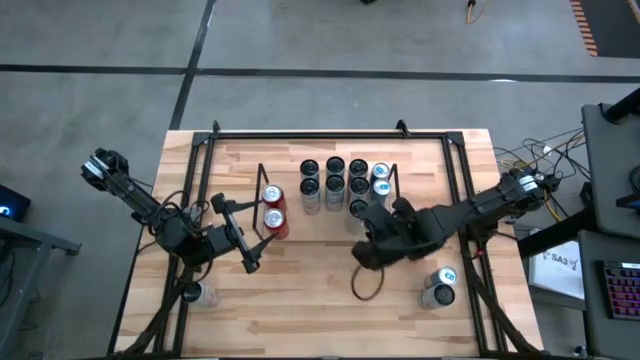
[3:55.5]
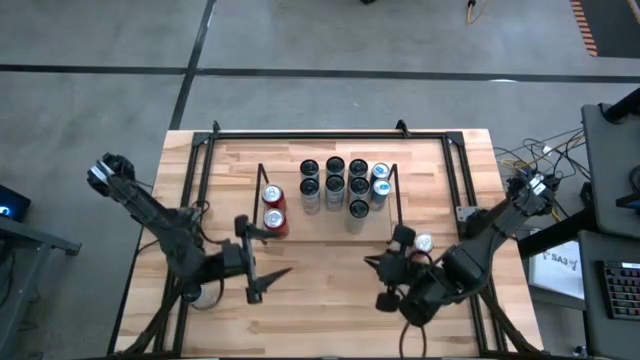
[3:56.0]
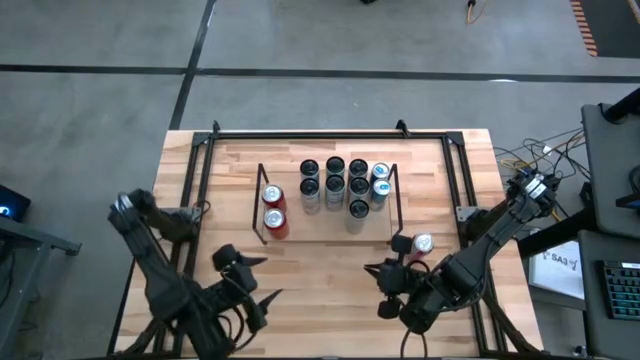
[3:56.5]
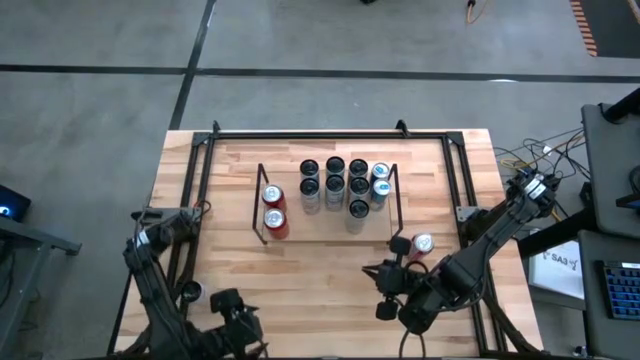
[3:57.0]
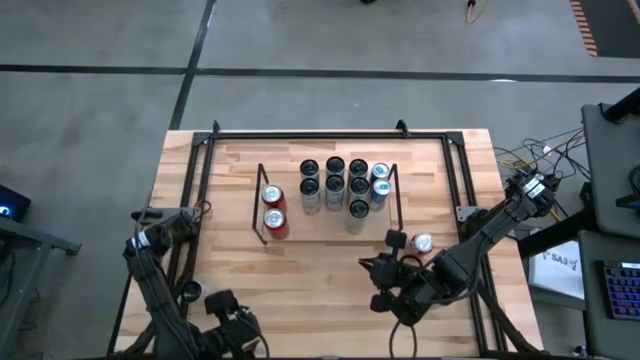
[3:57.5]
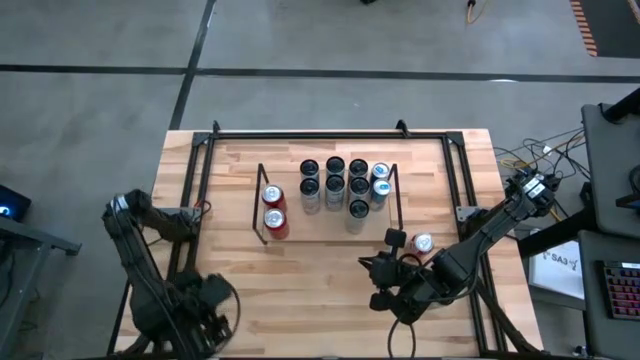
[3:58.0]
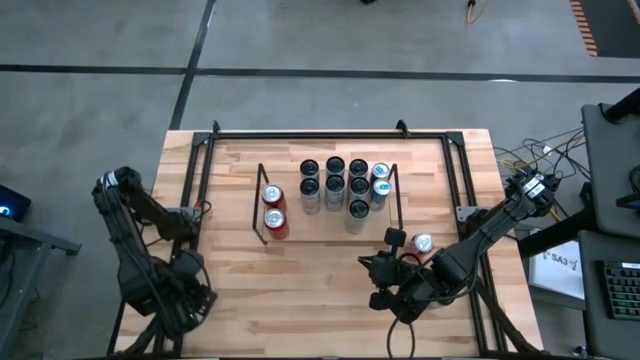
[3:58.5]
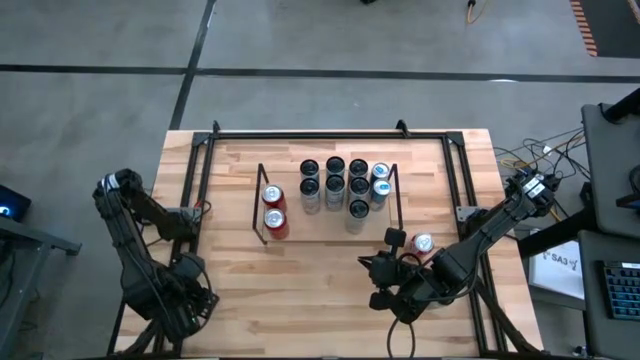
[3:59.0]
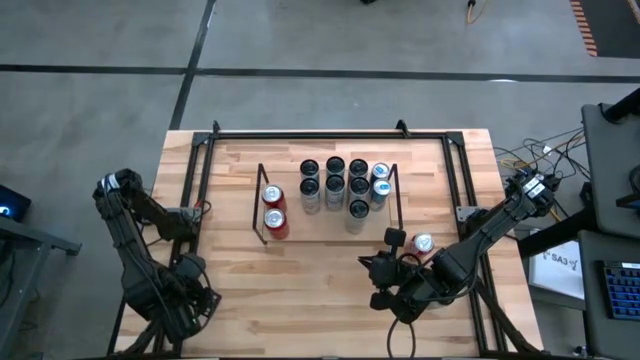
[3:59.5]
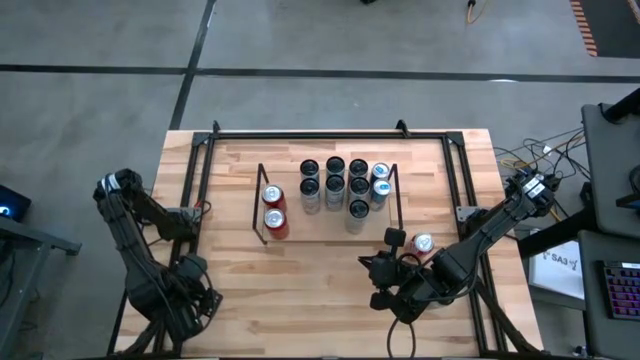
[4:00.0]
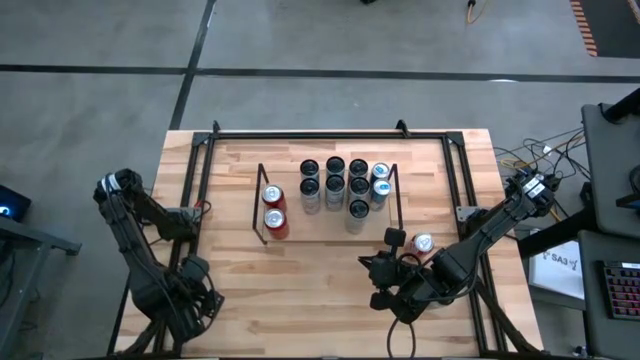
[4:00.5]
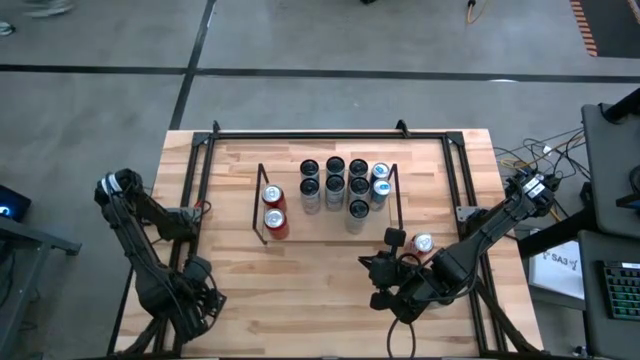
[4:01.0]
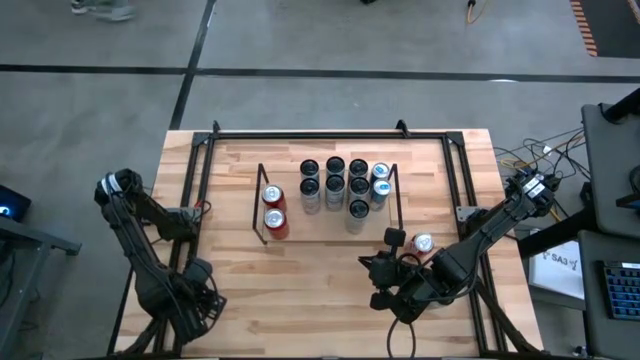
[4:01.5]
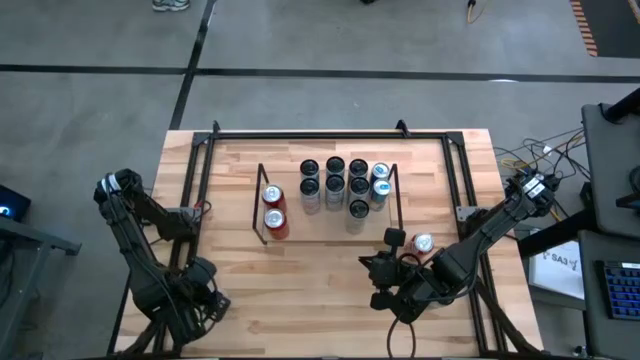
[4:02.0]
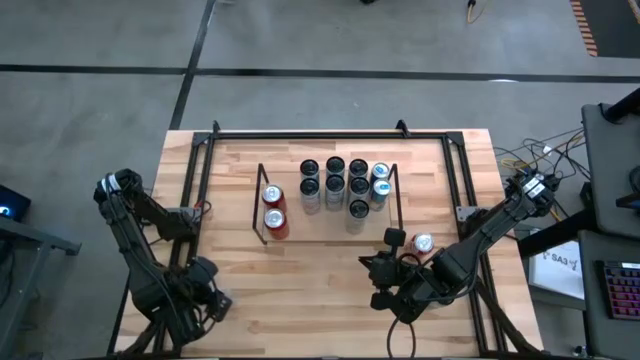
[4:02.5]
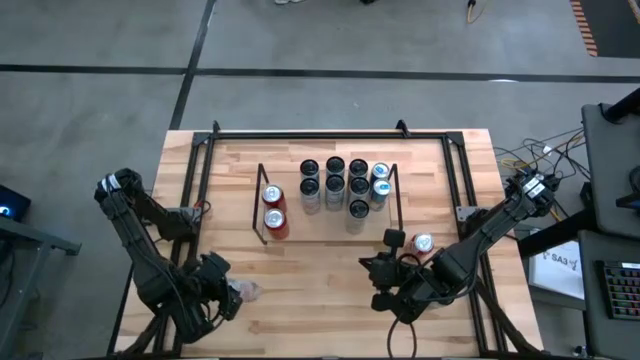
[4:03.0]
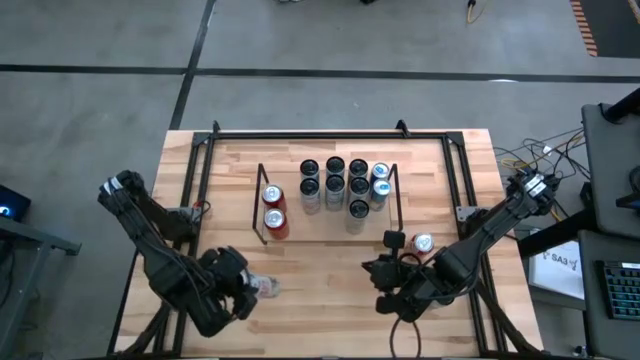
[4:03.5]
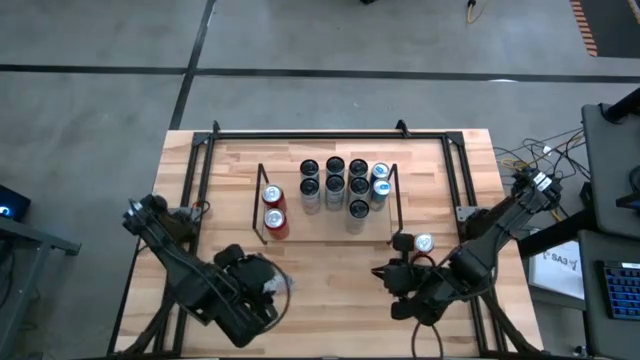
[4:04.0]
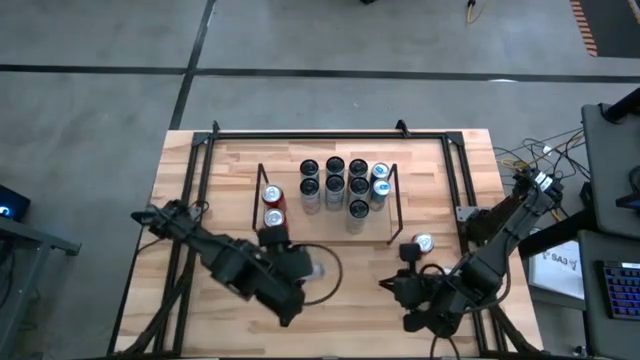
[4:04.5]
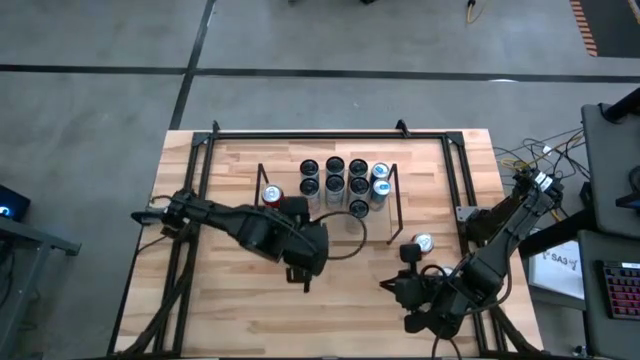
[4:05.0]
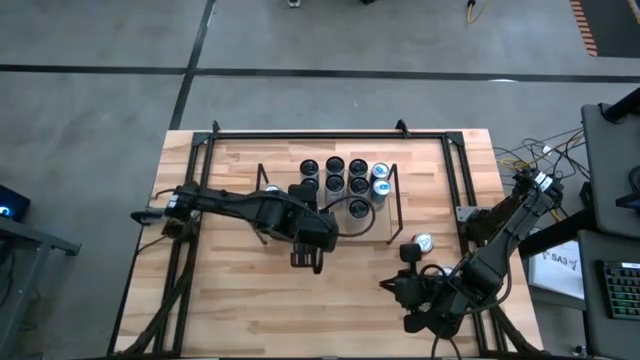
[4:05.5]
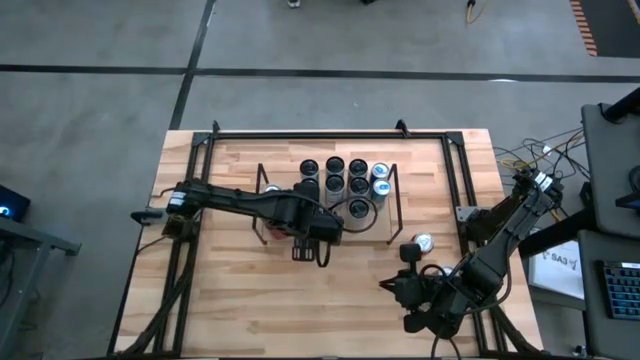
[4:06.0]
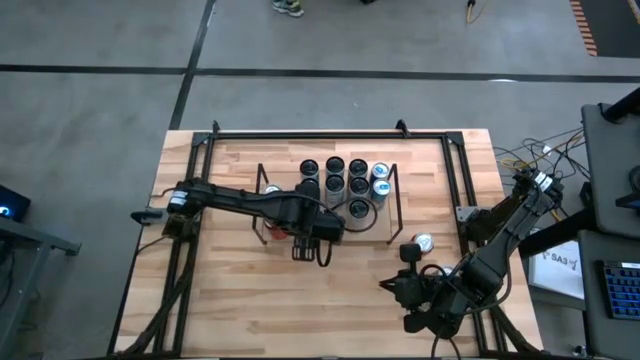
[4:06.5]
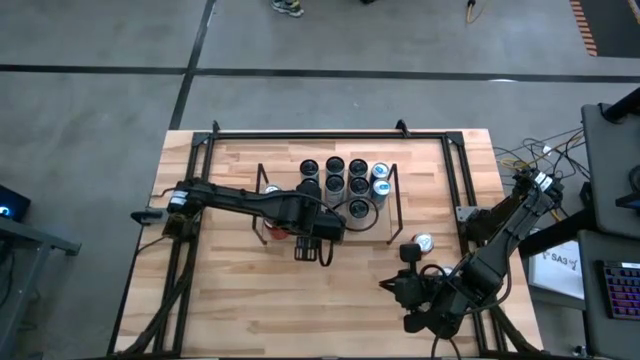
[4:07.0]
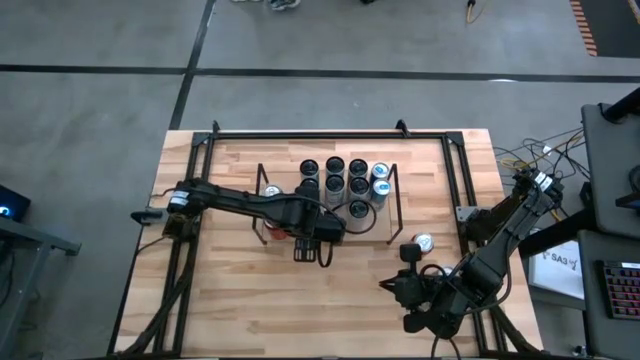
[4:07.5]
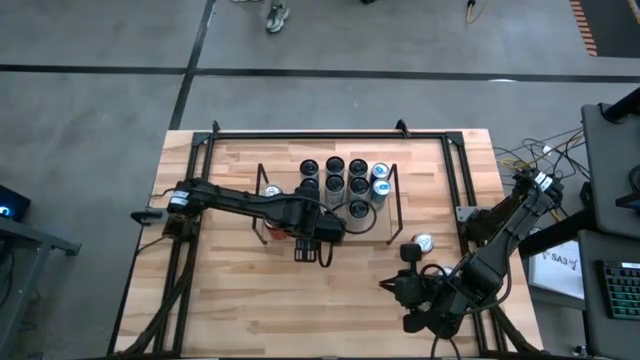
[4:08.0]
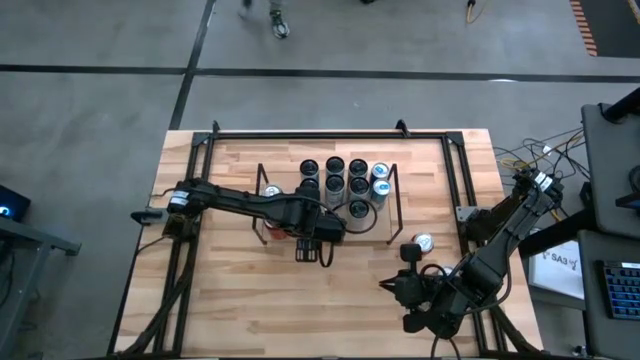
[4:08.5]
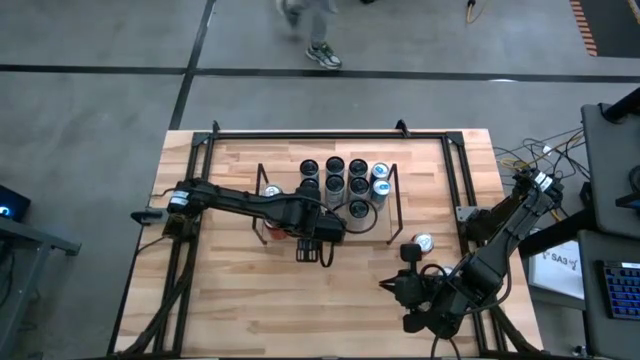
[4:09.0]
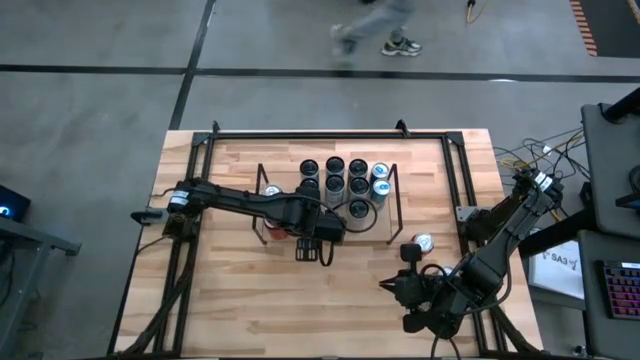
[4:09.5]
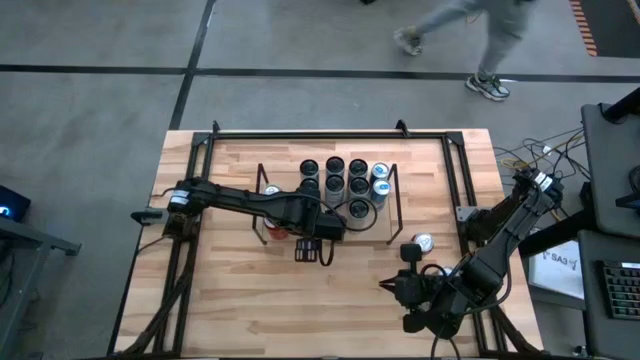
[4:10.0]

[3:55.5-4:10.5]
Task: Place canned beverage on shelf
Put the white and pink soda can on the shelf aligned with the other white and pink soda can

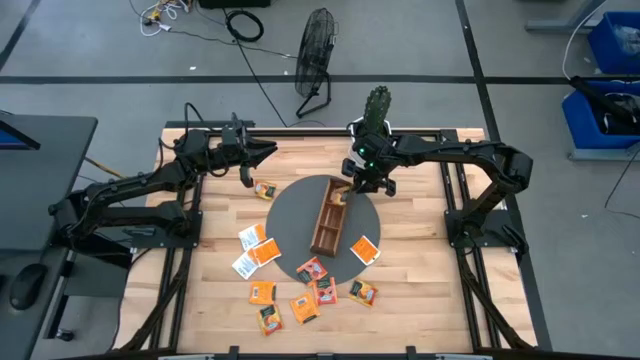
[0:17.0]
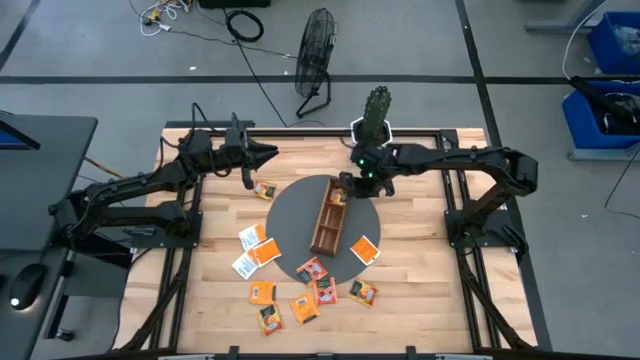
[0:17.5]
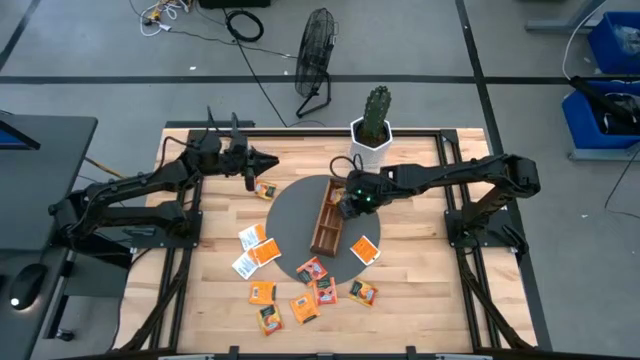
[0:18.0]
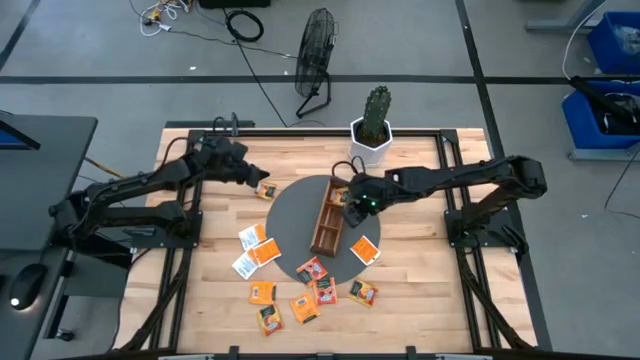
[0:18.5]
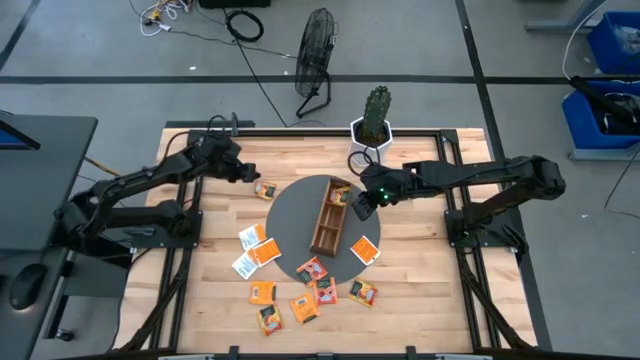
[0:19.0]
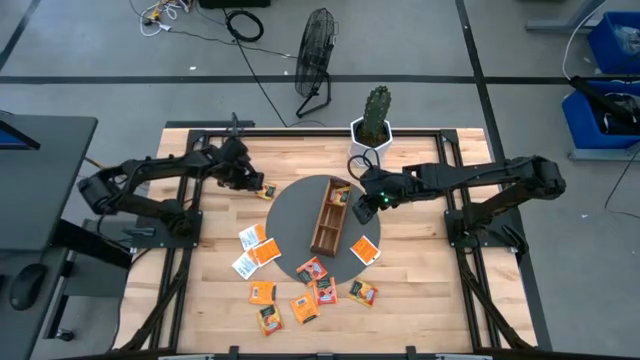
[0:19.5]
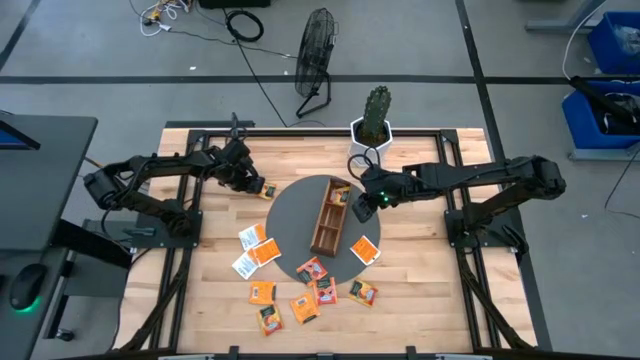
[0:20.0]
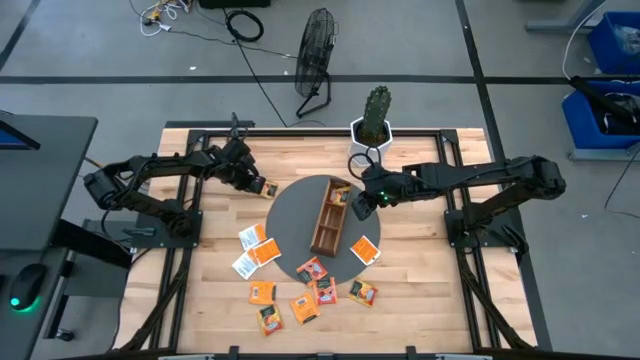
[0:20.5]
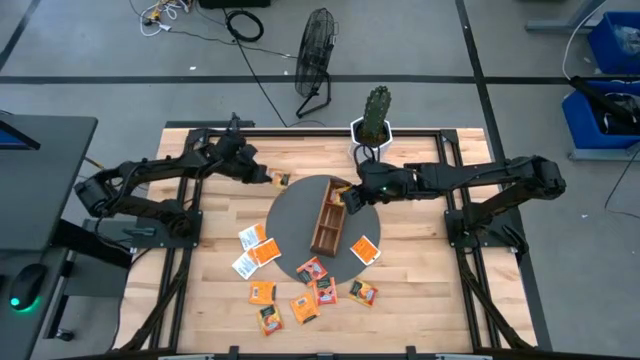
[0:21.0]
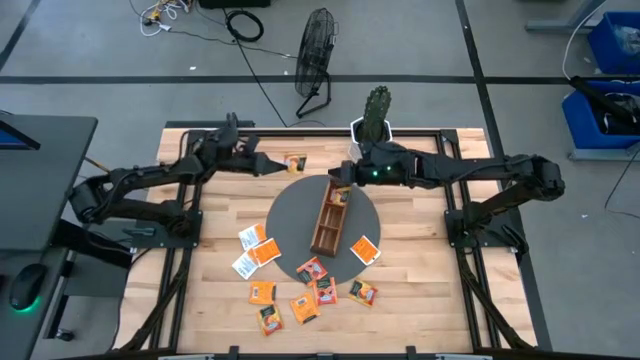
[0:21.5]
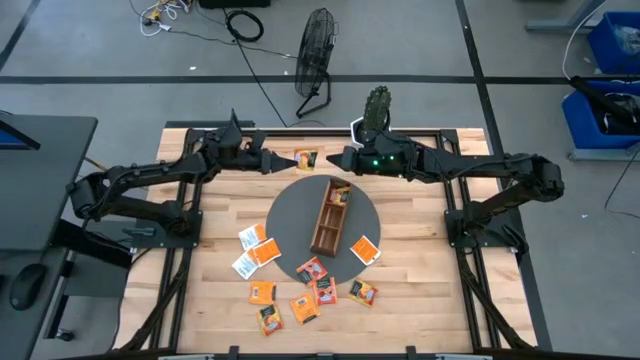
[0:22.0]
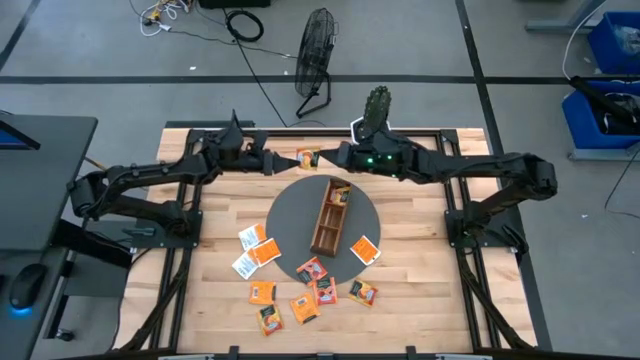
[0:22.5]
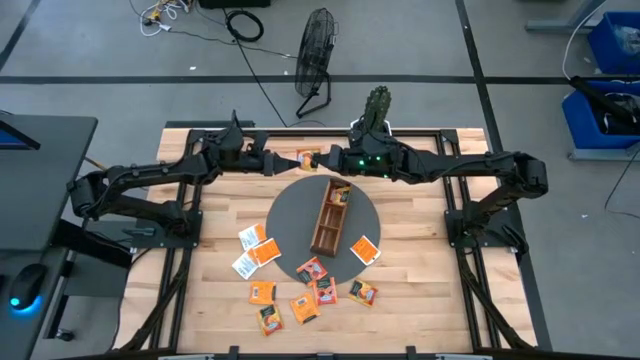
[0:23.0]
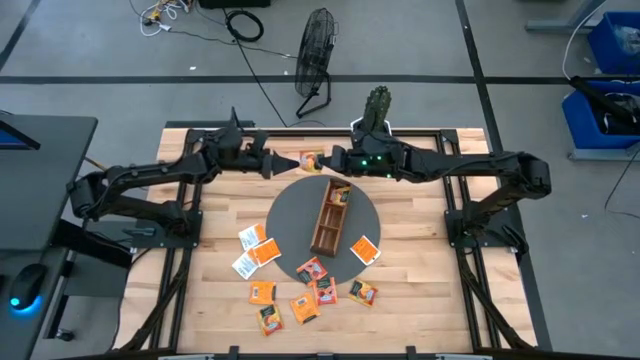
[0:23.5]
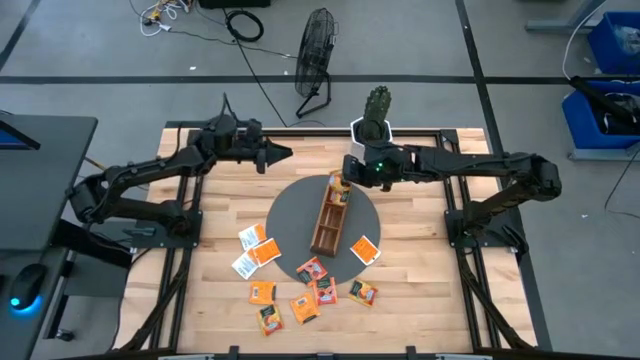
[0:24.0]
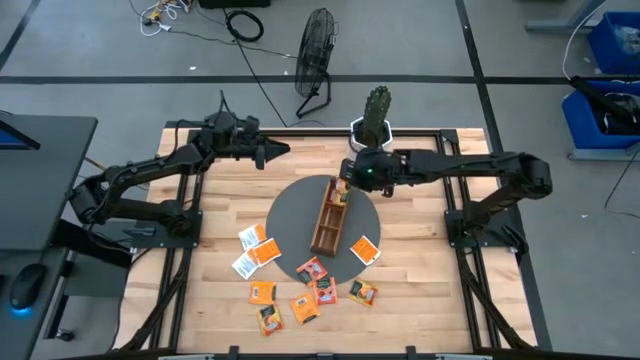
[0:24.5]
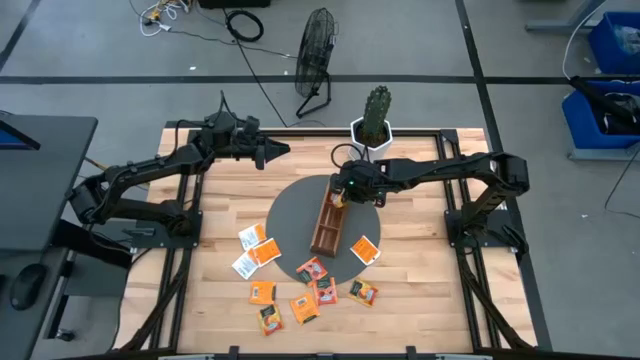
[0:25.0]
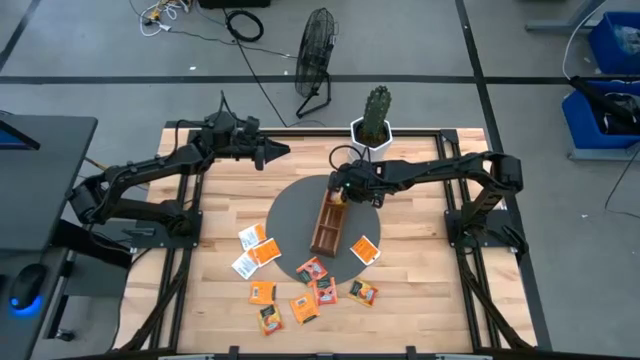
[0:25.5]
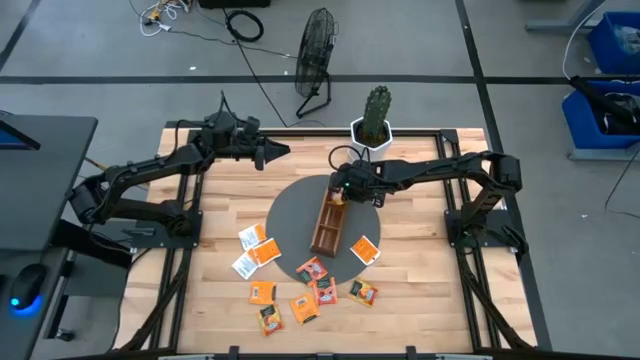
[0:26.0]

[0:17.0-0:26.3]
Task: Pick & Place Tea
Put the orange tea bag into the top section of the wooden organizer
